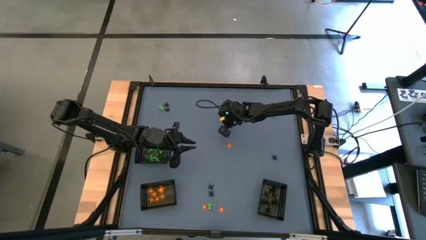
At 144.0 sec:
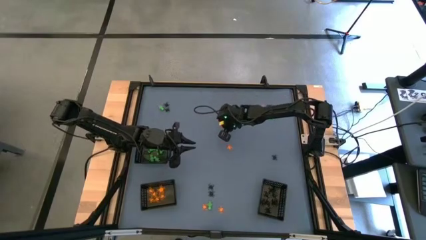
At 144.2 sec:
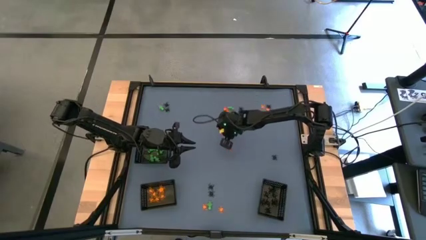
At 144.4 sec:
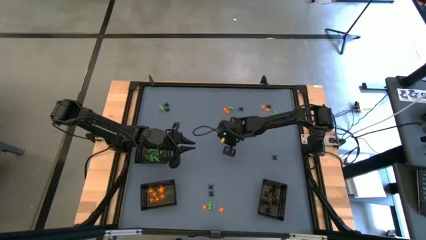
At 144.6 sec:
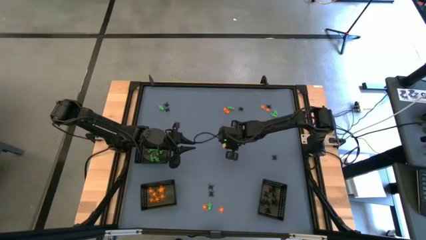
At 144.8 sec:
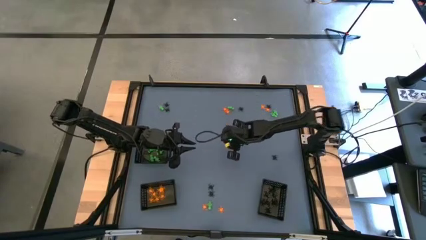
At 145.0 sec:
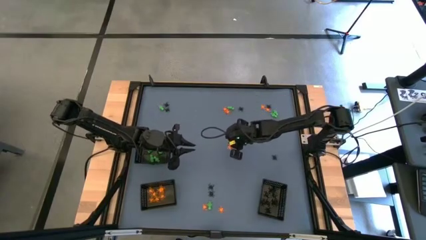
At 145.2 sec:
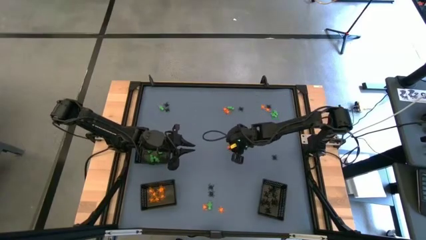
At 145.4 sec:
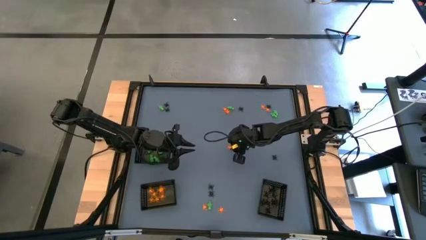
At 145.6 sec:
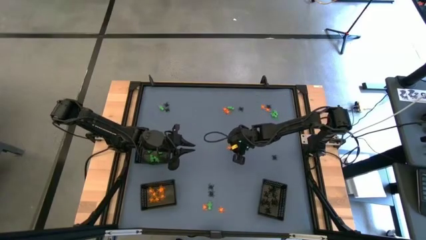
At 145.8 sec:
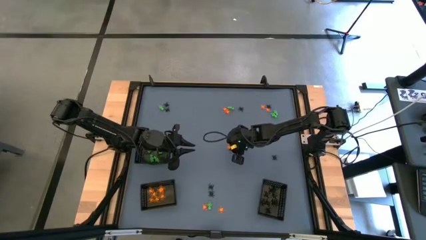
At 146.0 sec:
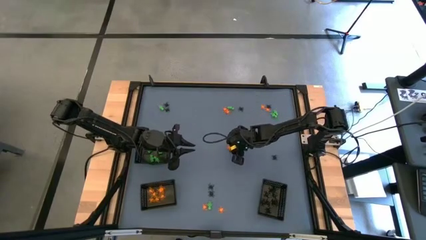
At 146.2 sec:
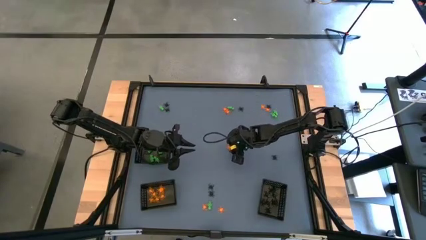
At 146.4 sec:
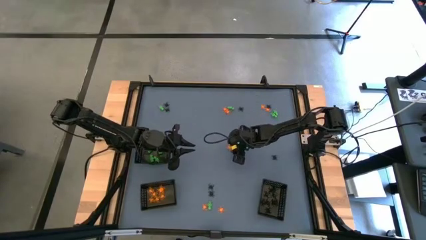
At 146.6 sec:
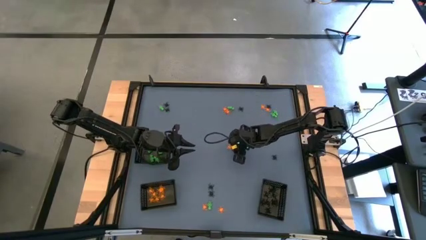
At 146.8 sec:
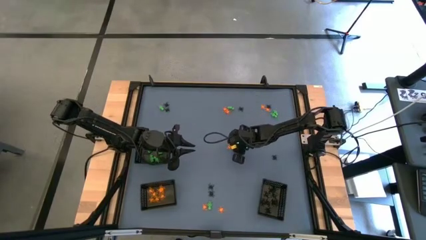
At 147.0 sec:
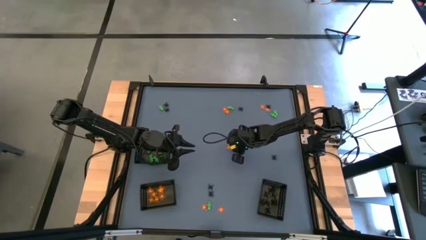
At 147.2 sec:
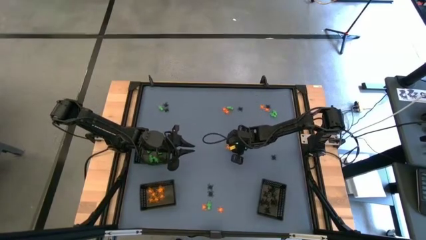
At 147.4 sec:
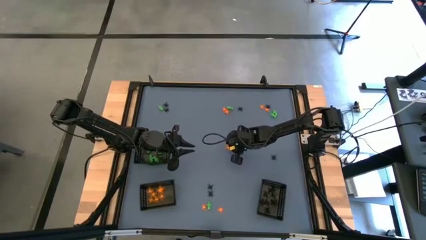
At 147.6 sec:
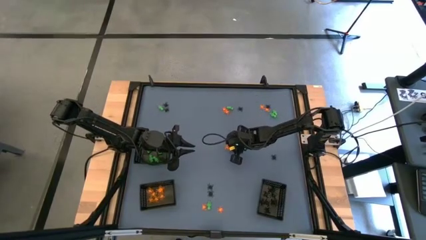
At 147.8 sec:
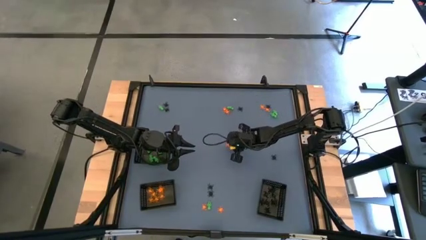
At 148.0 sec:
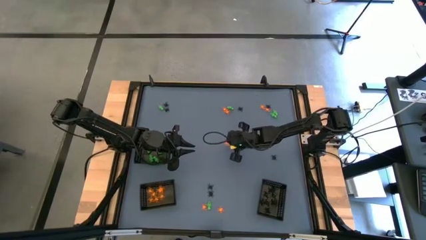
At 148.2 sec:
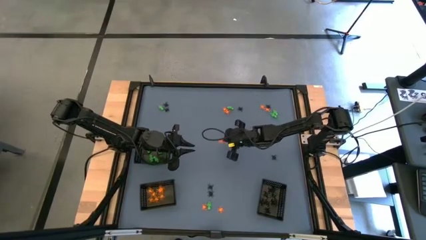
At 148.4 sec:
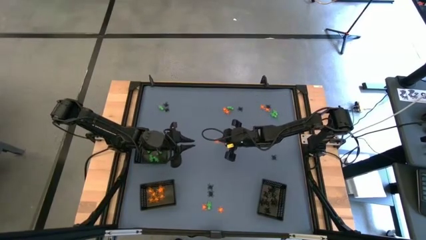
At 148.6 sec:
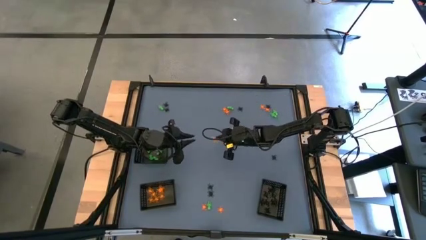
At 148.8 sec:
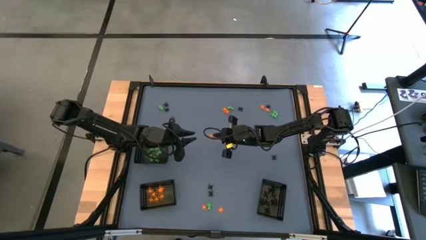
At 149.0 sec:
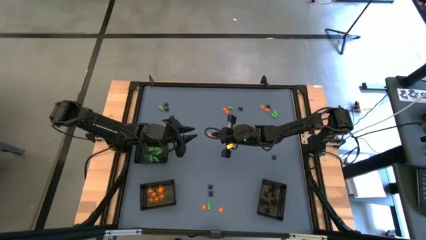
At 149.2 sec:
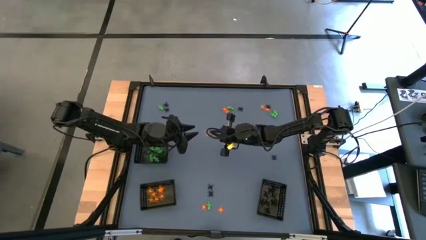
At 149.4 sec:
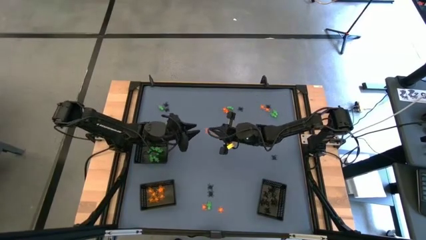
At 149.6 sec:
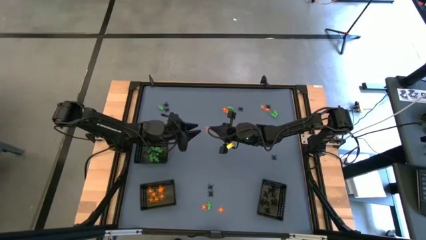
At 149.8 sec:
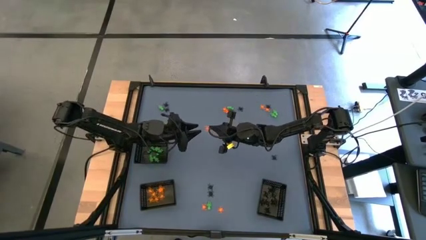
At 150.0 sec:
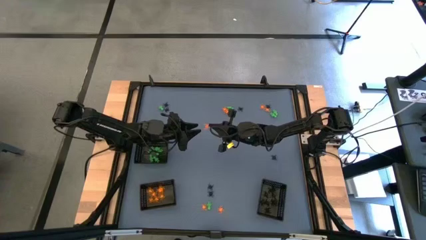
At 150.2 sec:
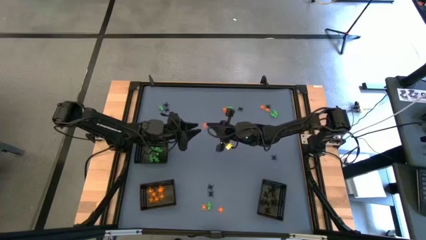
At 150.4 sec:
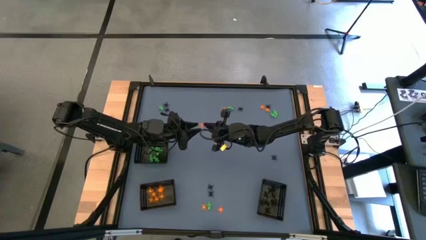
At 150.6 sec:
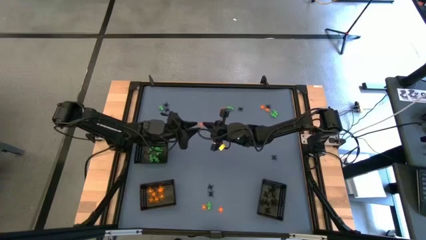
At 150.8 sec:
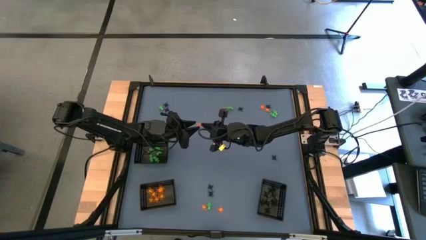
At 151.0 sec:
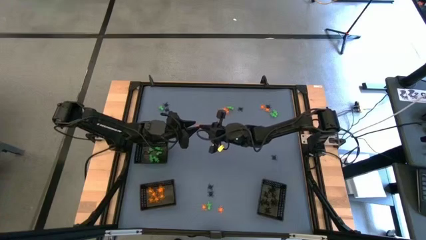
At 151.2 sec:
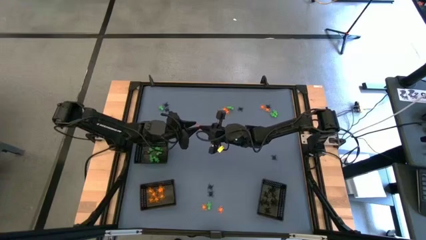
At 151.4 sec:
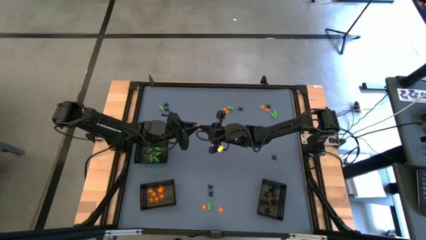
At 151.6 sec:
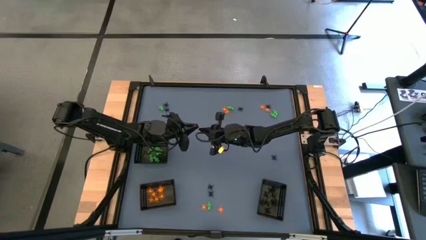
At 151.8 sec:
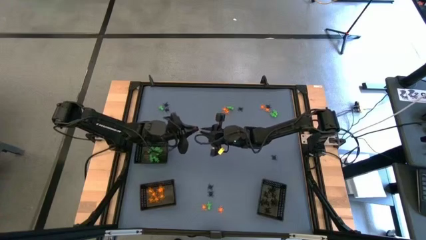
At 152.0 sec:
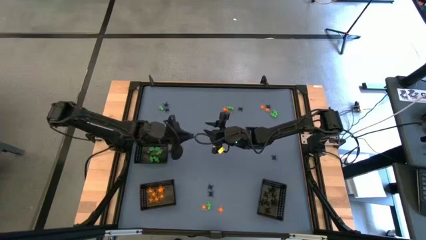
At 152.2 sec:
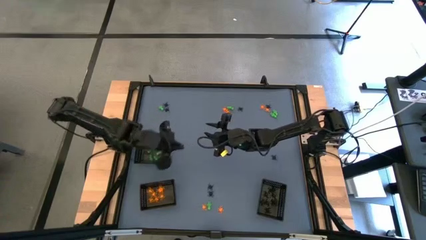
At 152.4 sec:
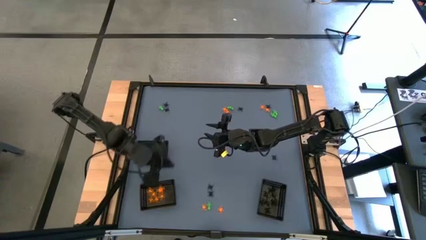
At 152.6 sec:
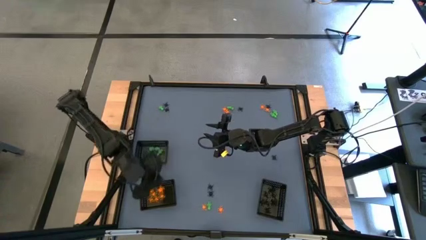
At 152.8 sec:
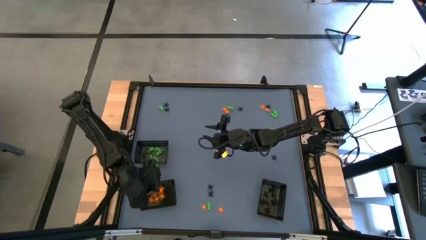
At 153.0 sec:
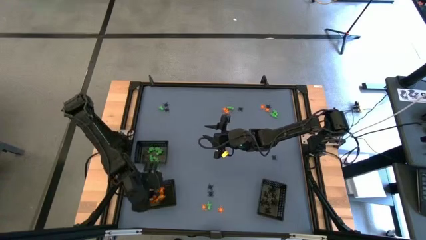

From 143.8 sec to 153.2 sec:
Task: Sort Halloween decoration
Put the orange spider toy into the bottom left black bin

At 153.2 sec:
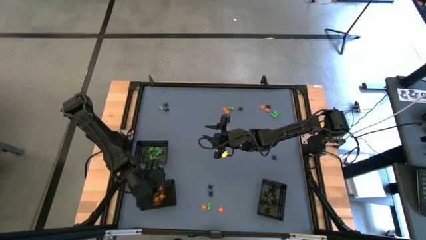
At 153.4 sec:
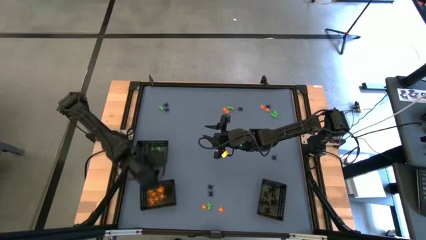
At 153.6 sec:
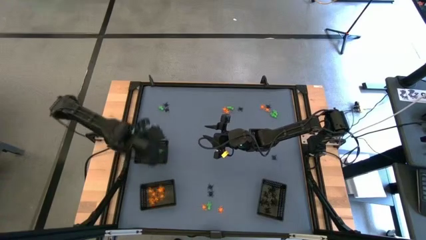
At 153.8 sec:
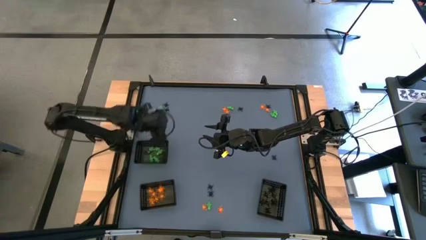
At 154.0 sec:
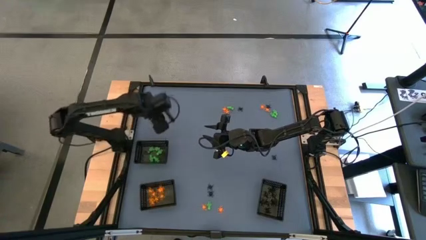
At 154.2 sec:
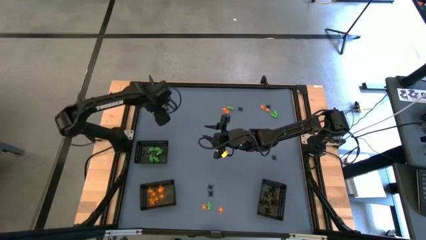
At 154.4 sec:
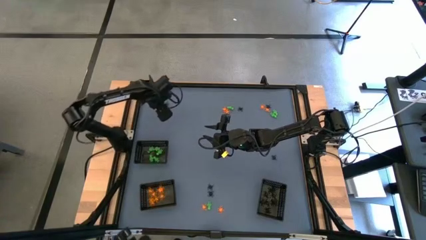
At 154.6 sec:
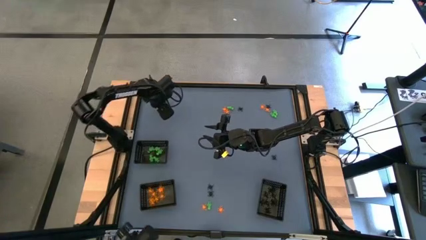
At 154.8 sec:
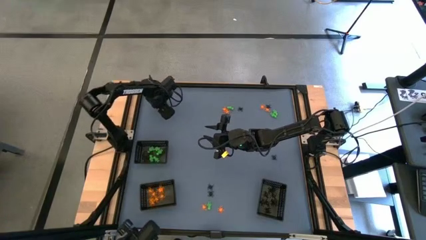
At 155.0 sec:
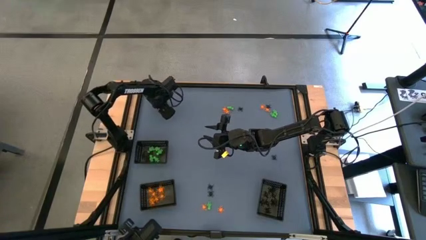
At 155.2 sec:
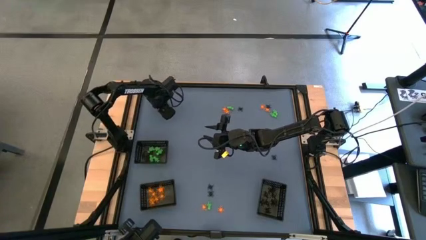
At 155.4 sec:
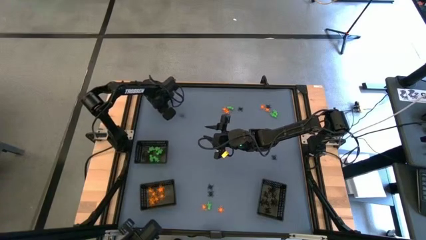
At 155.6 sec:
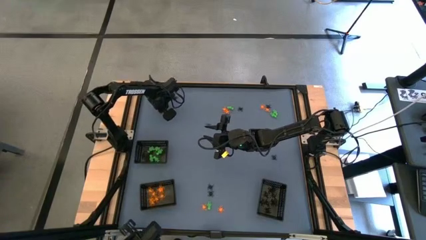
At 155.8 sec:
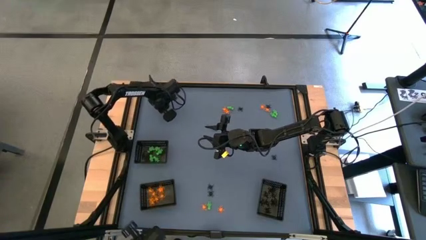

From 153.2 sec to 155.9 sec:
Put the green skeleton toy into the top black bin

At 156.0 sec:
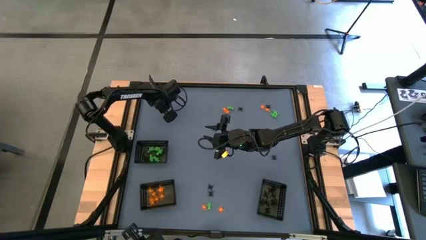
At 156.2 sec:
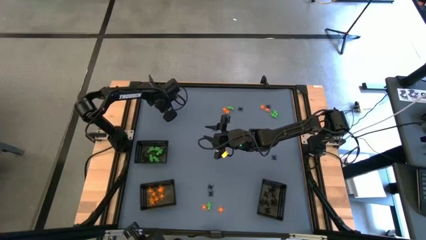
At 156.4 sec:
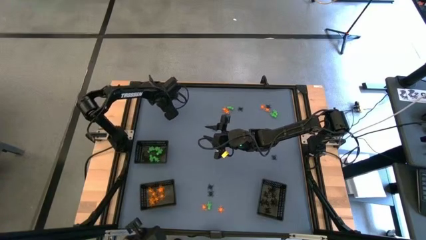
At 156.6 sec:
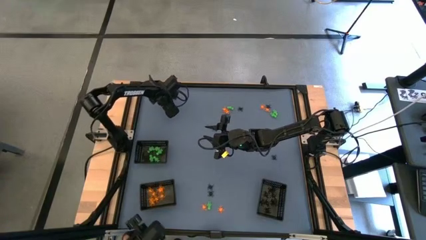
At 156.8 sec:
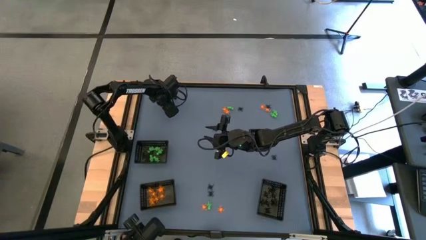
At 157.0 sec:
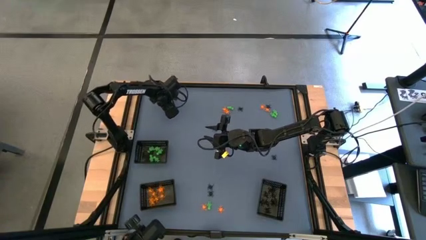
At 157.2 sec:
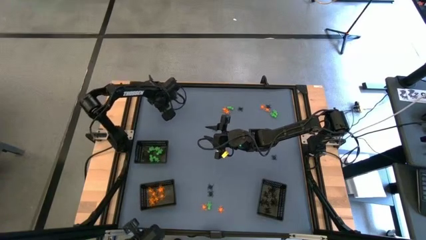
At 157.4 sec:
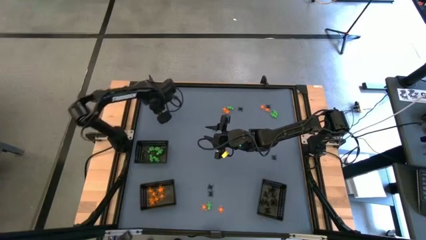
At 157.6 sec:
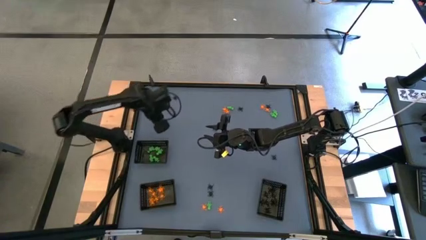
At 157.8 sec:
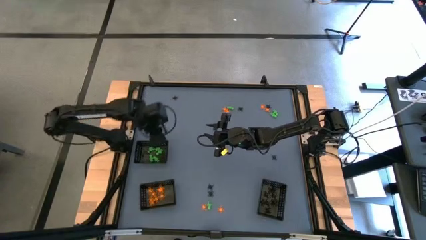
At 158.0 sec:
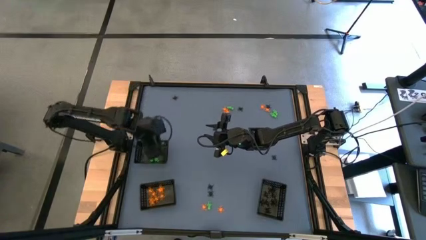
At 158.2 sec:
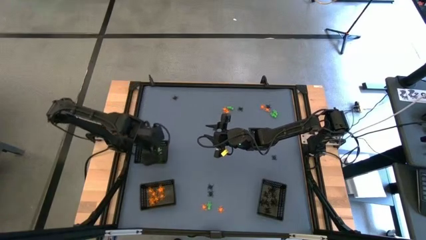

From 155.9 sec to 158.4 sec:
Put the green skeleton toy into the top black bin

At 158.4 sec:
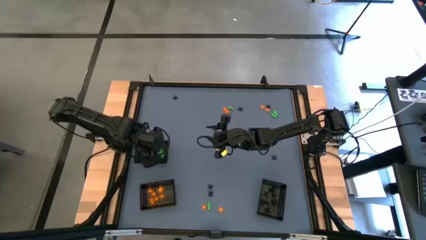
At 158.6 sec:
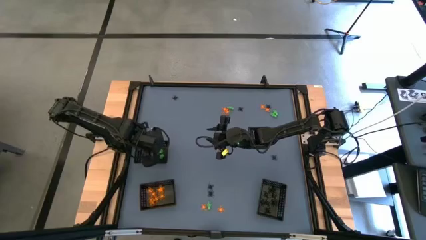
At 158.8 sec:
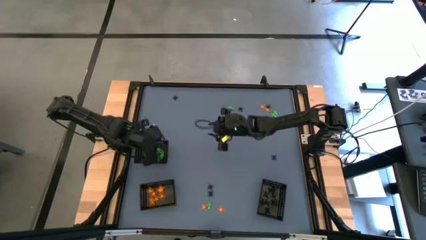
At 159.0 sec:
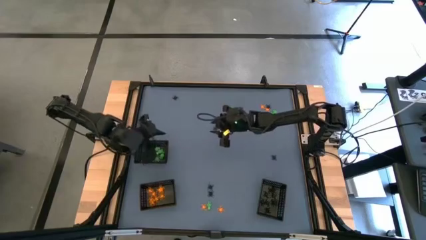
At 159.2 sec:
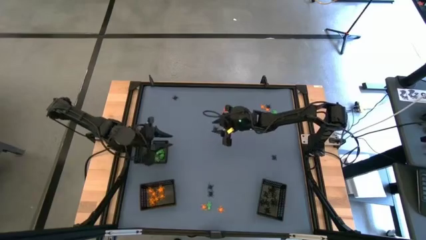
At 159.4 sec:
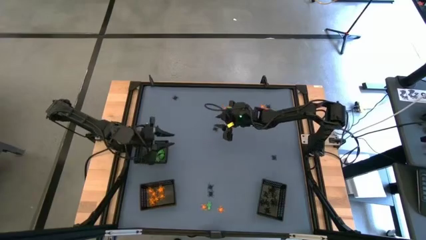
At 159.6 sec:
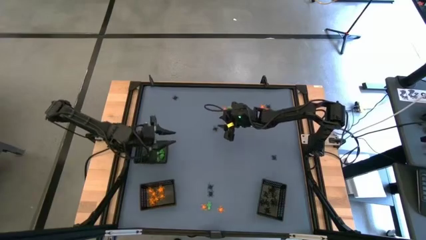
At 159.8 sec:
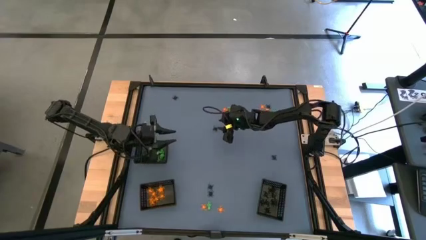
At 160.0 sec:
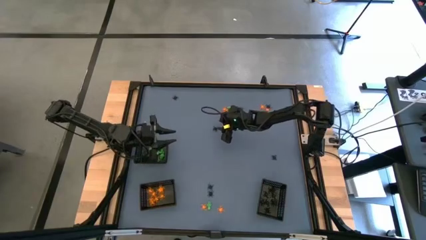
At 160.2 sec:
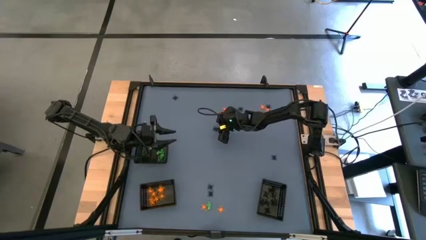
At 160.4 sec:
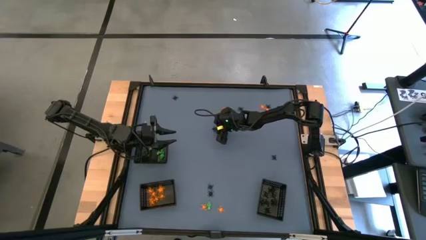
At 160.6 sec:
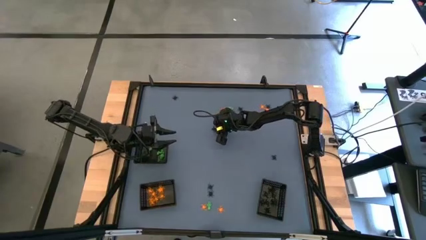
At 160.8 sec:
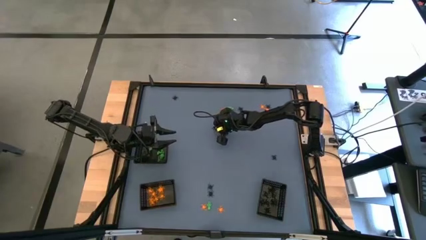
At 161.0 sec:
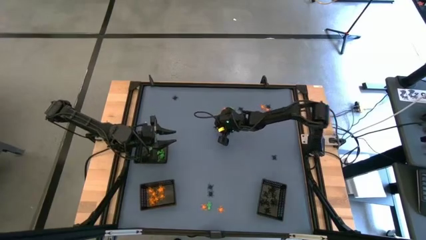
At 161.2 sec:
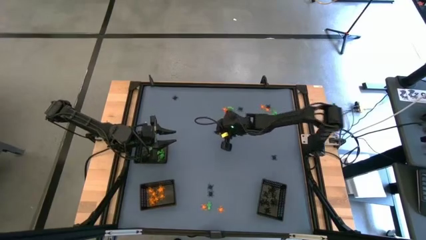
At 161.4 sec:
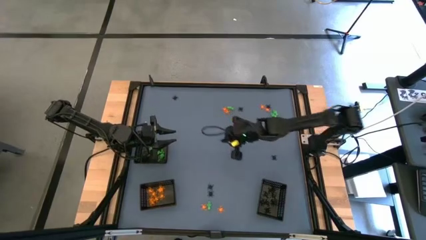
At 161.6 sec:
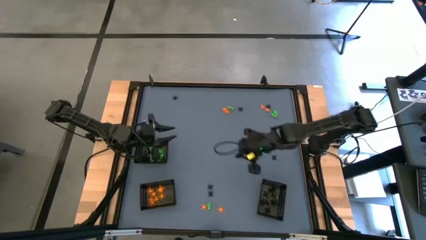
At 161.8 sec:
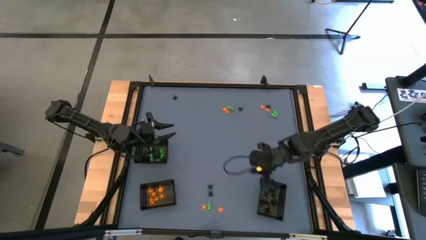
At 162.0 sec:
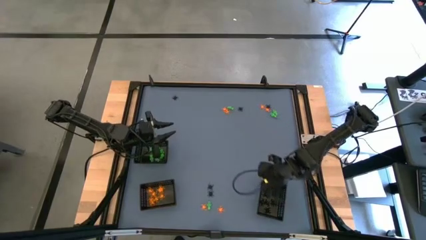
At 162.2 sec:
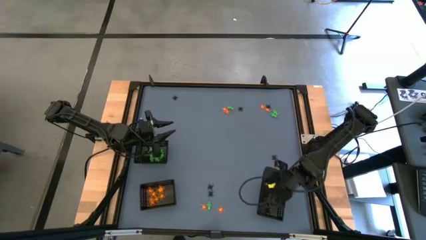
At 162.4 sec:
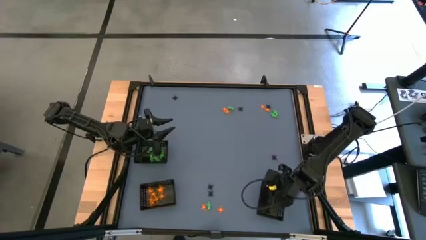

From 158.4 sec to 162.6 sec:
Put the black spider toy into the bottom right black bin
